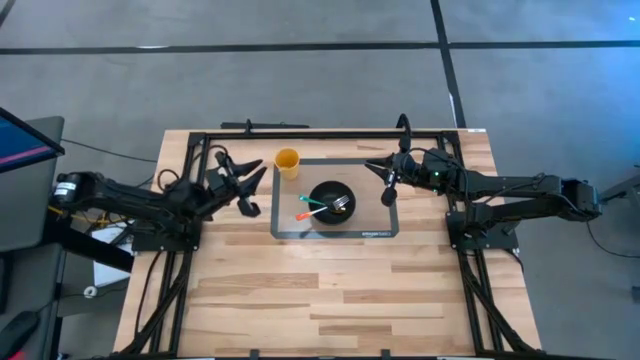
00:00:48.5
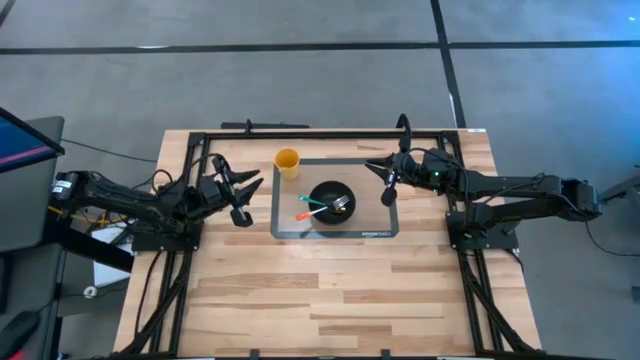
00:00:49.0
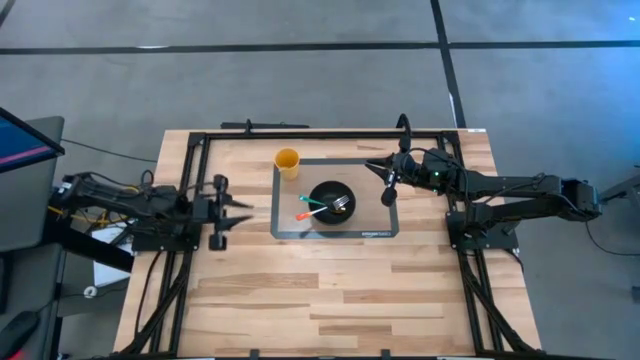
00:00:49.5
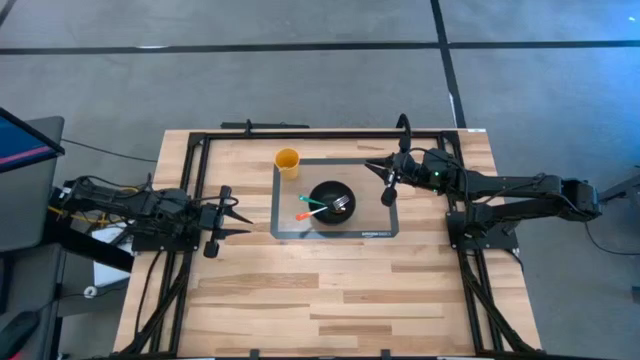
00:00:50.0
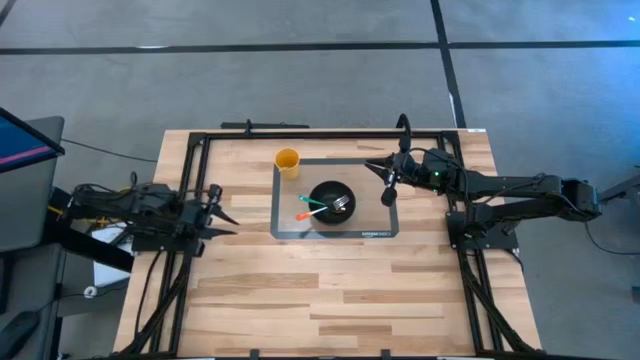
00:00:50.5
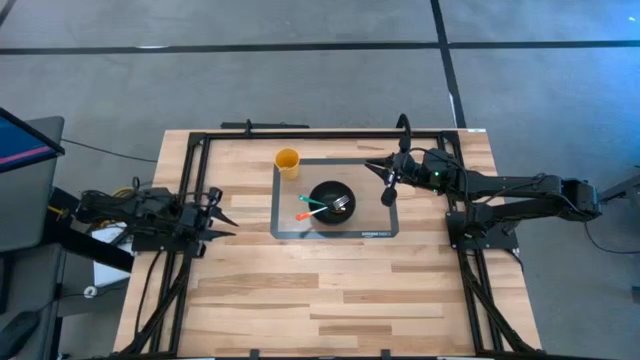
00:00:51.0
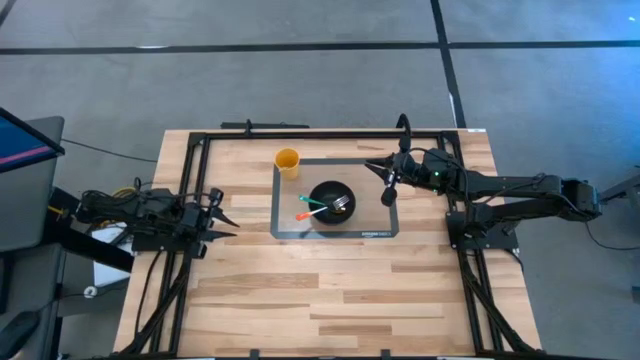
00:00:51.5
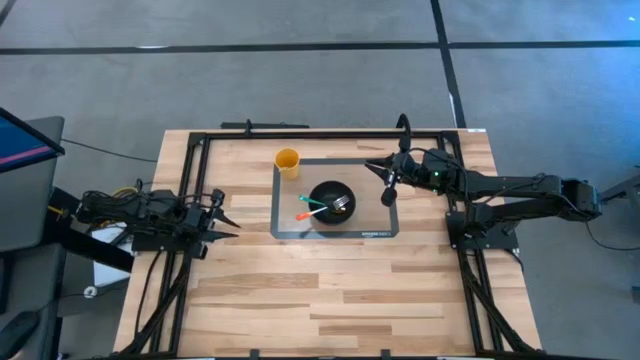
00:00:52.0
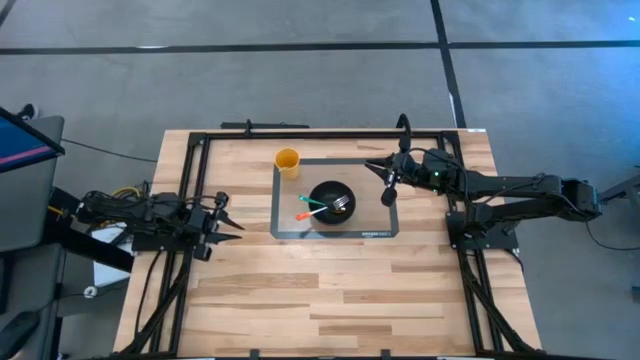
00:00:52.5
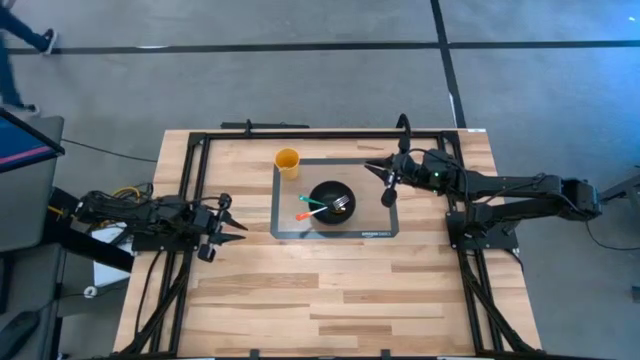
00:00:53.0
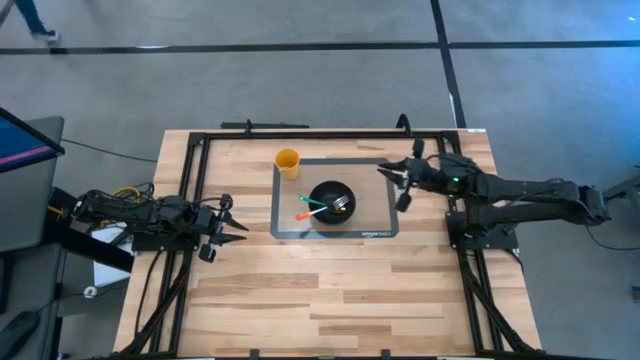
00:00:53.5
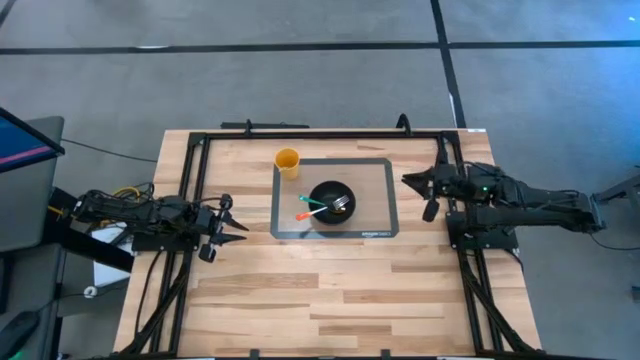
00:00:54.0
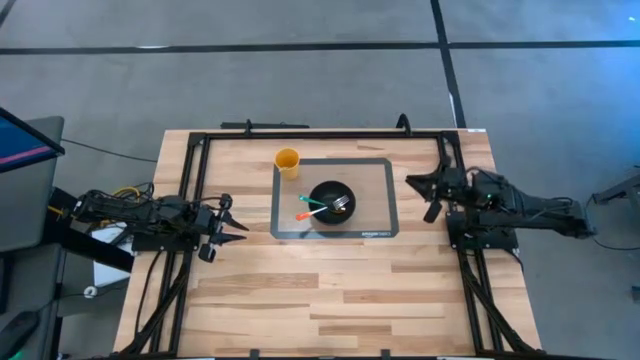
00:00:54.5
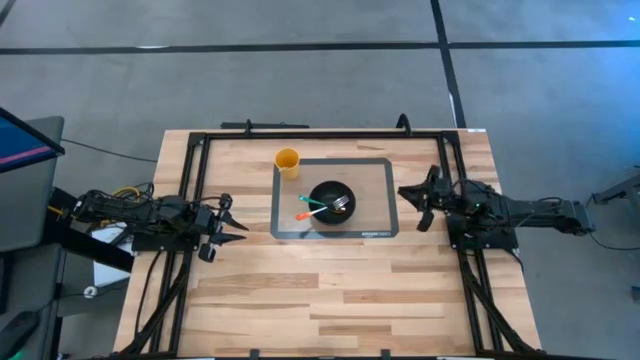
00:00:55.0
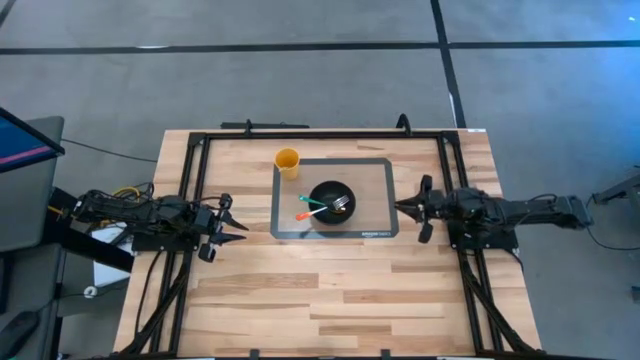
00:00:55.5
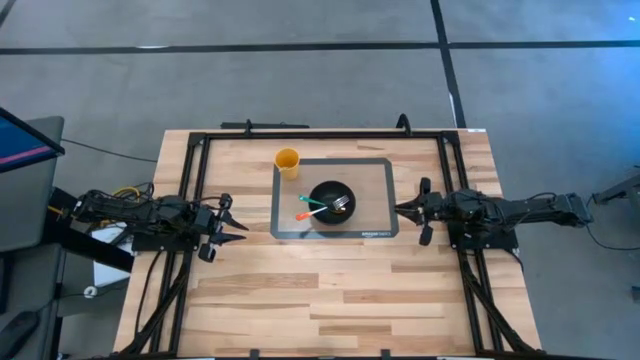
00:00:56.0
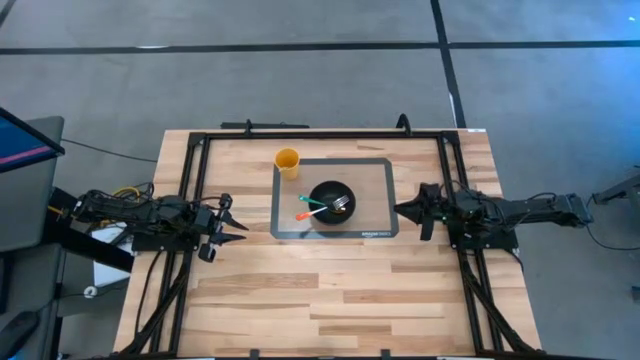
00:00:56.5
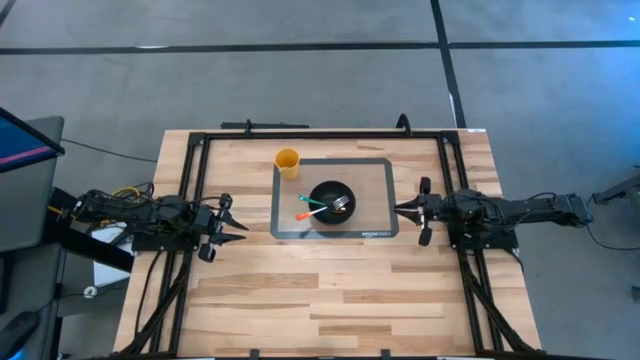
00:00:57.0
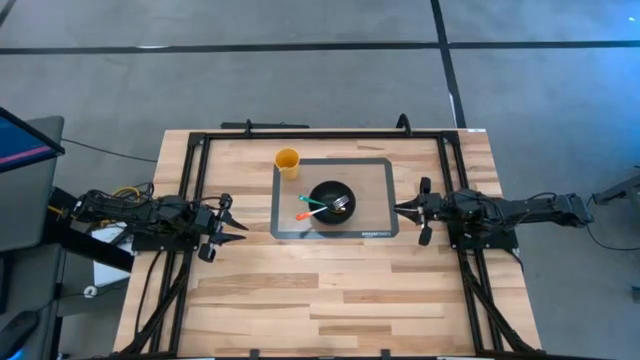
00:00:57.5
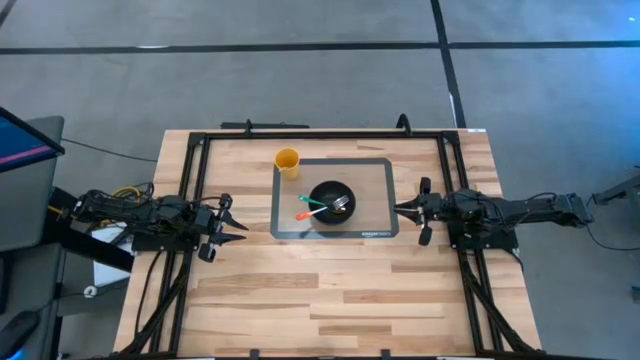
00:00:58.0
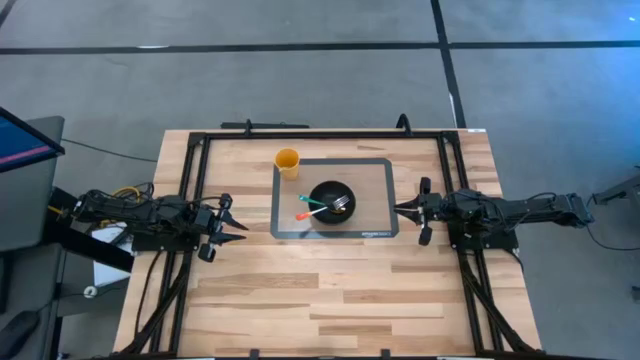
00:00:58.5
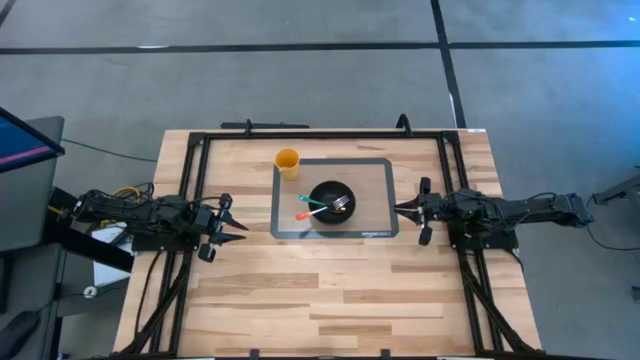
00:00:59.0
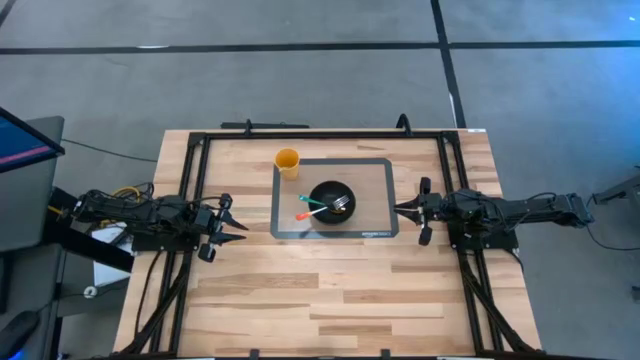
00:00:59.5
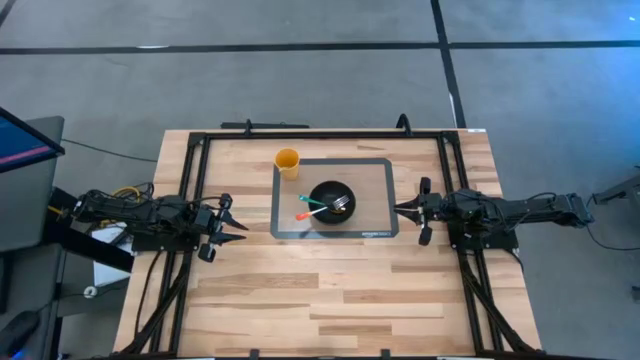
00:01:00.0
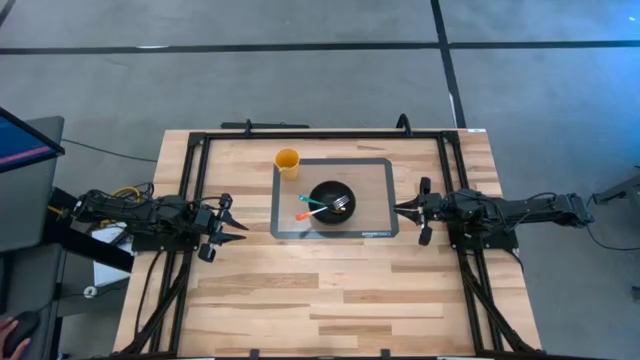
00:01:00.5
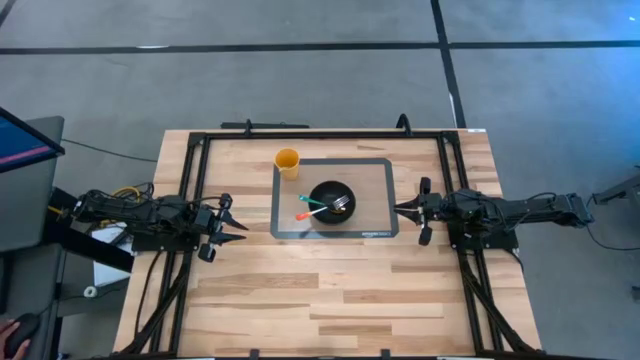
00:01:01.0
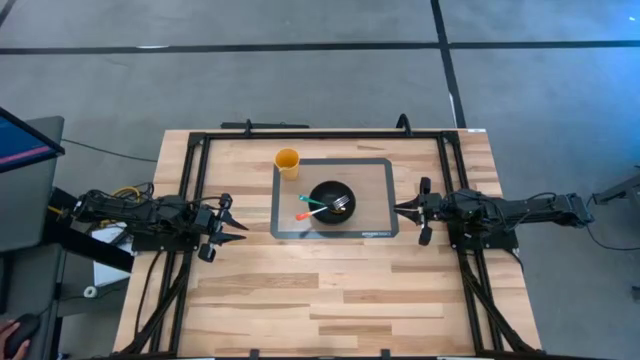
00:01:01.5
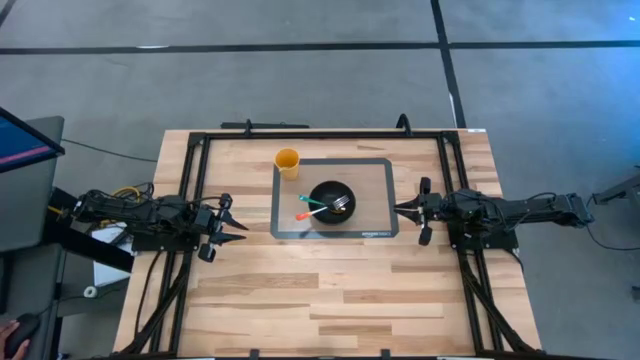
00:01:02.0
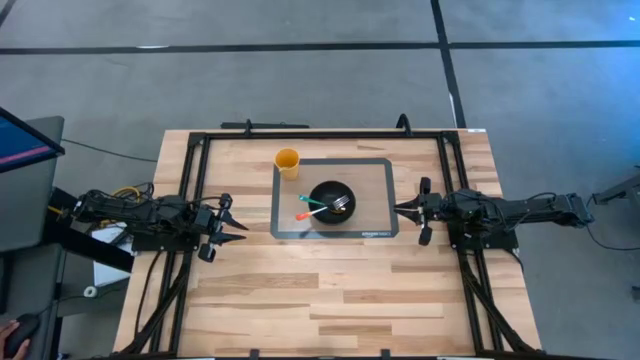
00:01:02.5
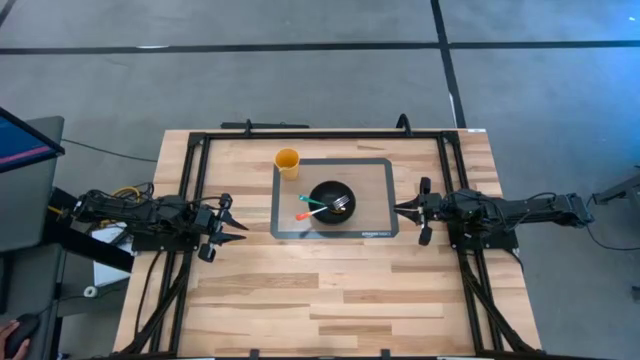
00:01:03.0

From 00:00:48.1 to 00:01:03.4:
Task: Pick & Place Utensil
Return to Home Position

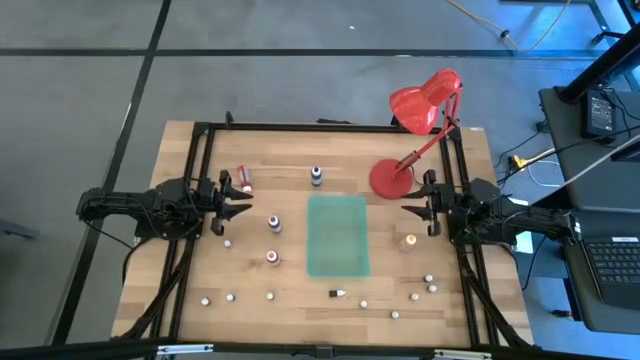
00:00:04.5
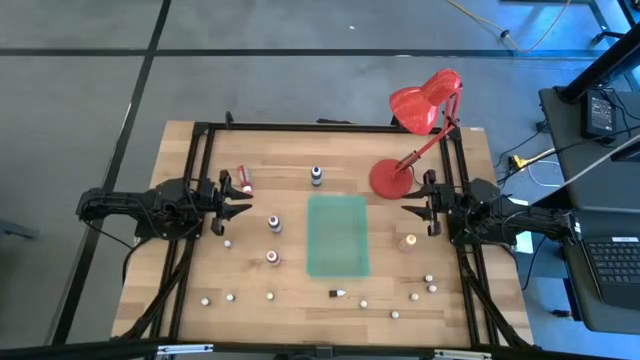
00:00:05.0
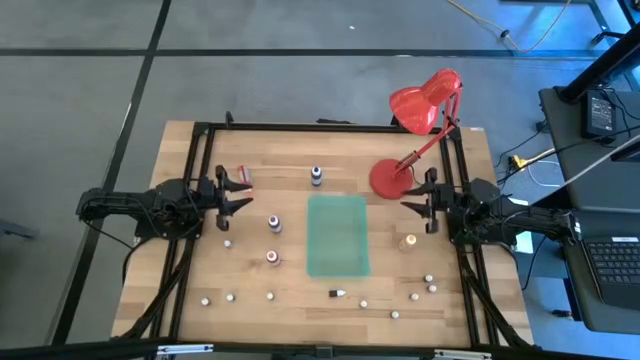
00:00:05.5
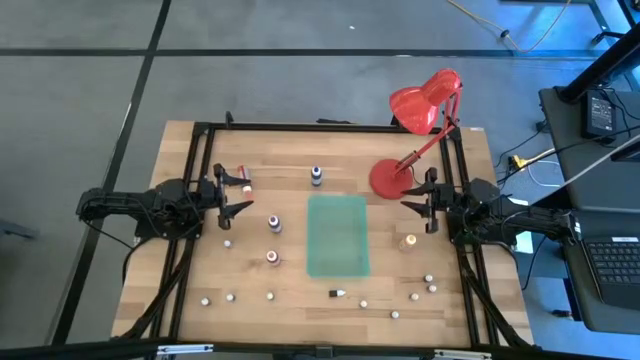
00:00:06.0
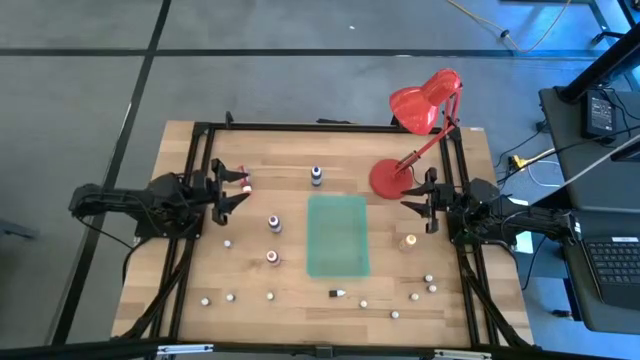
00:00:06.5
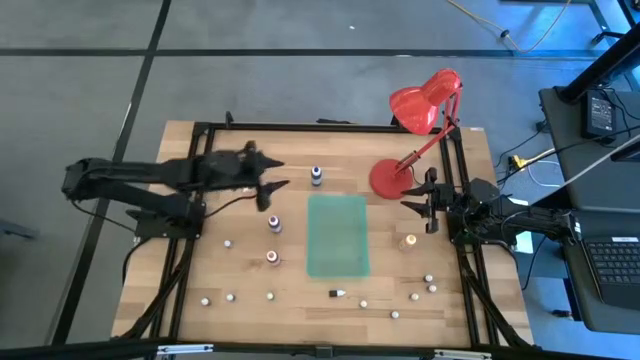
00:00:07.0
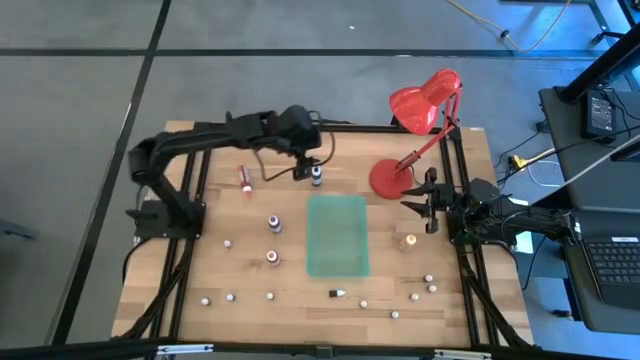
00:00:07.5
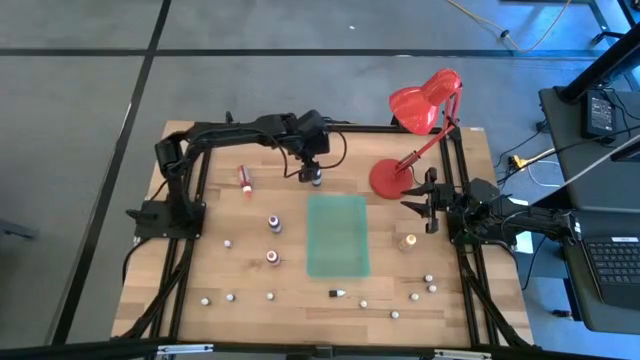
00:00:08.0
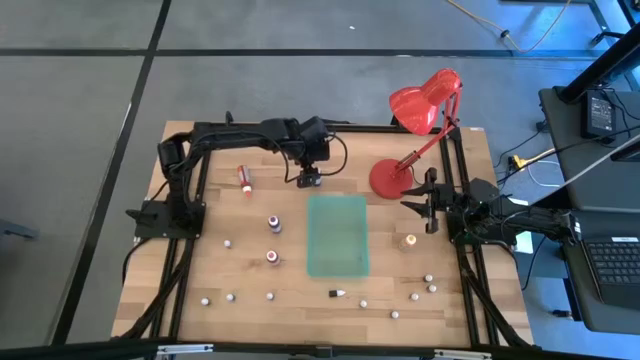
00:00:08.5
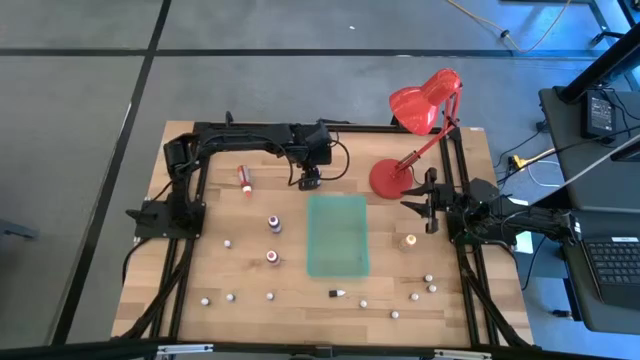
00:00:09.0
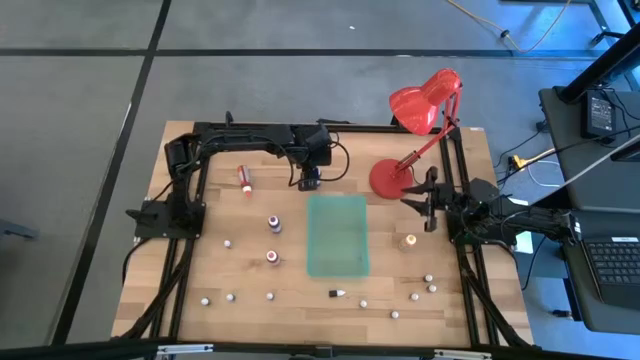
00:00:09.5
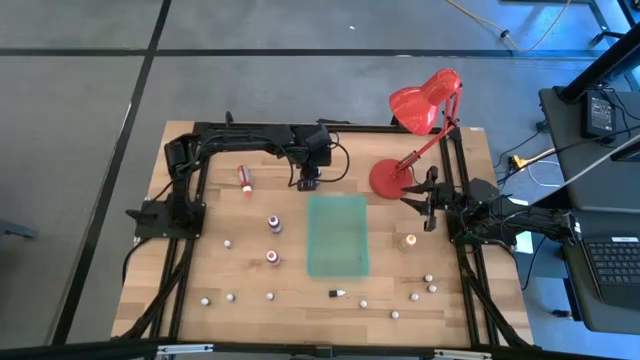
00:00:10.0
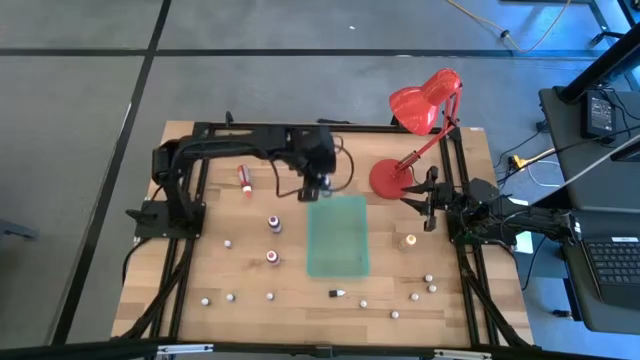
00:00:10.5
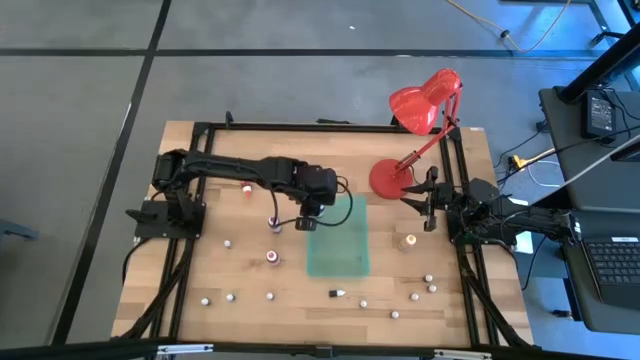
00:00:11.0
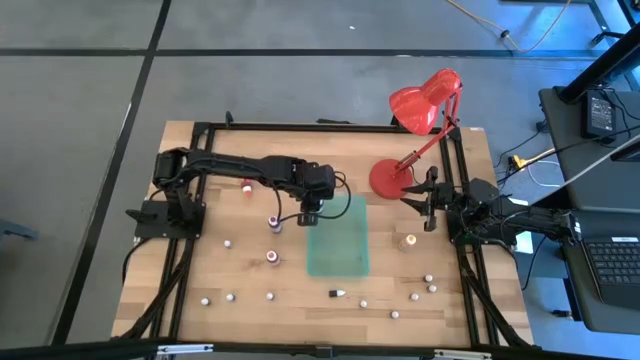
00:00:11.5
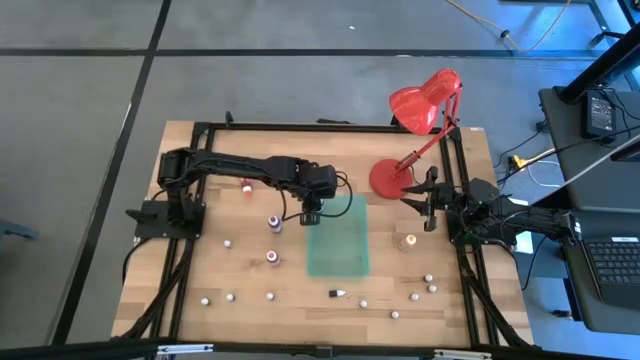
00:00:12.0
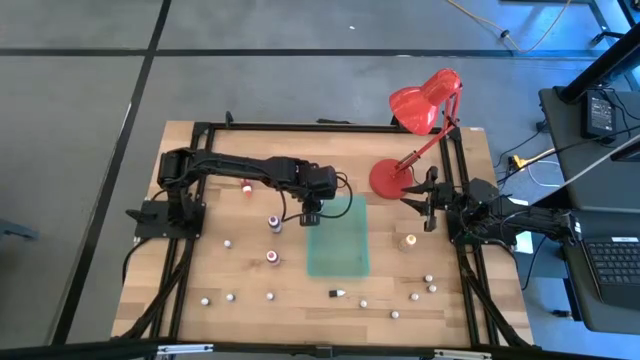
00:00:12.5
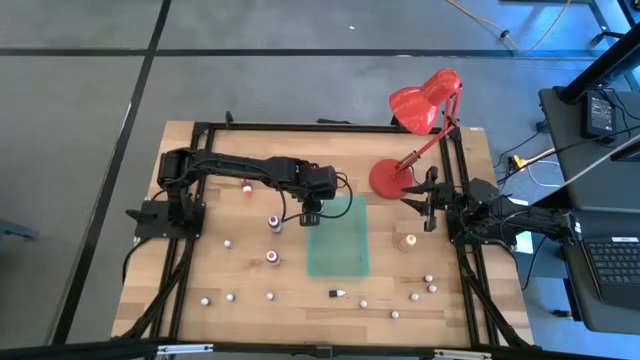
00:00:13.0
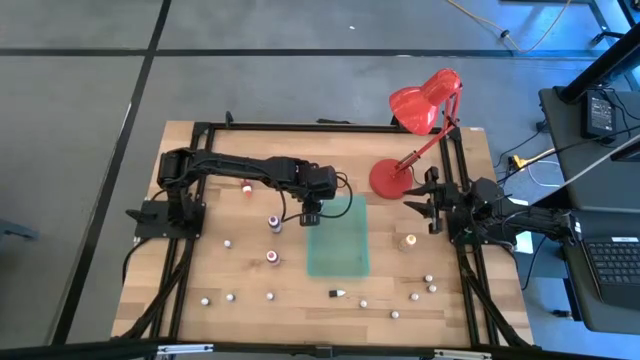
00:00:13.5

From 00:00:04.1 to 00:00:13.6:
Task: Pick & Place food coloring
Put the large blue food coloring bottle into the green bin
